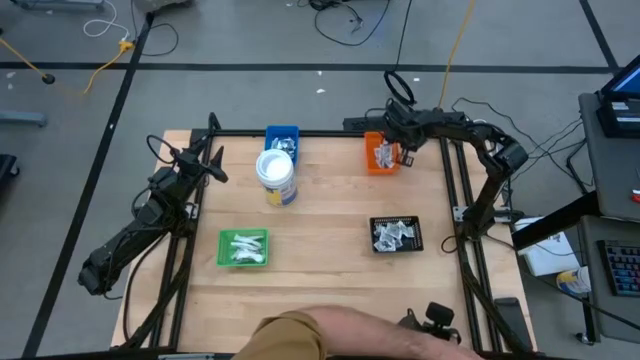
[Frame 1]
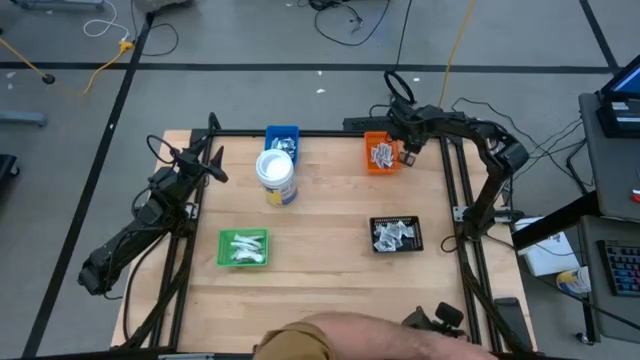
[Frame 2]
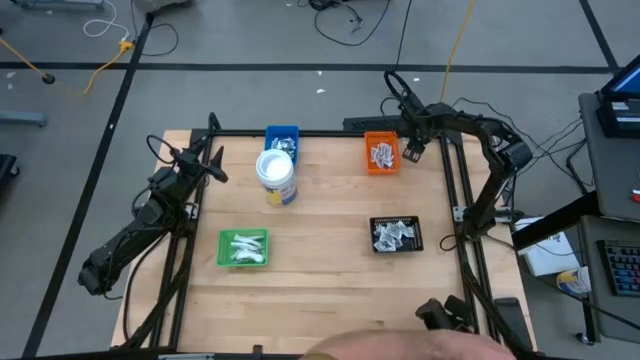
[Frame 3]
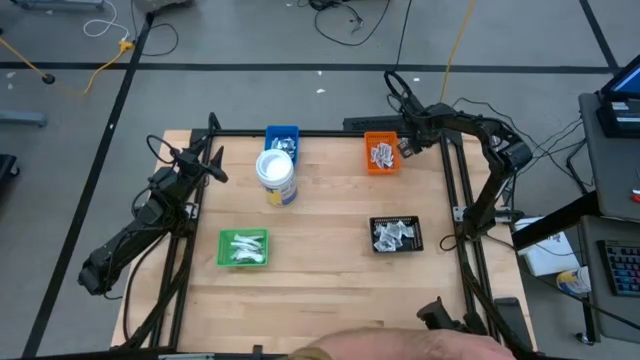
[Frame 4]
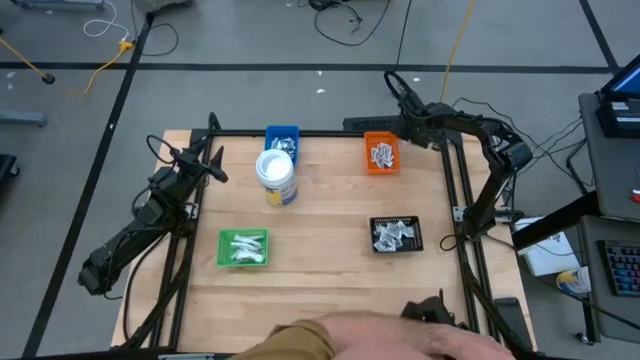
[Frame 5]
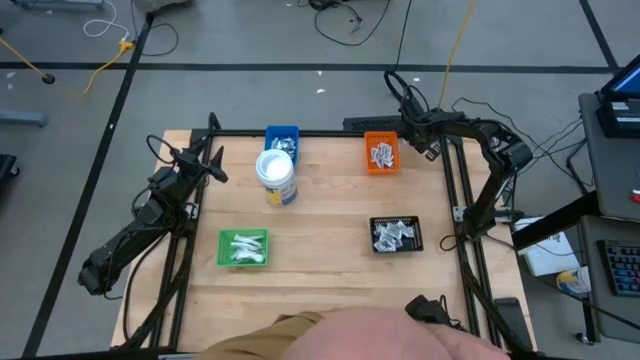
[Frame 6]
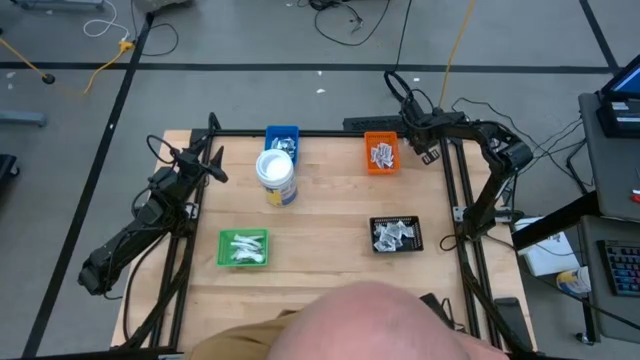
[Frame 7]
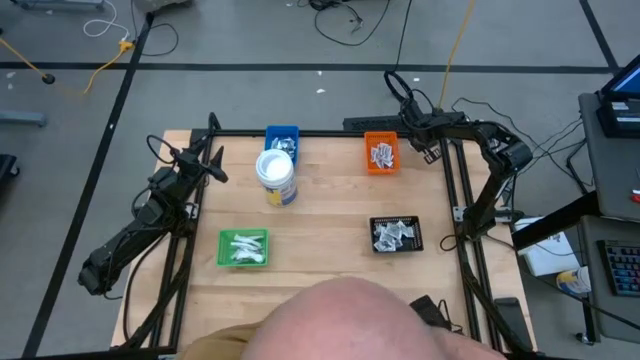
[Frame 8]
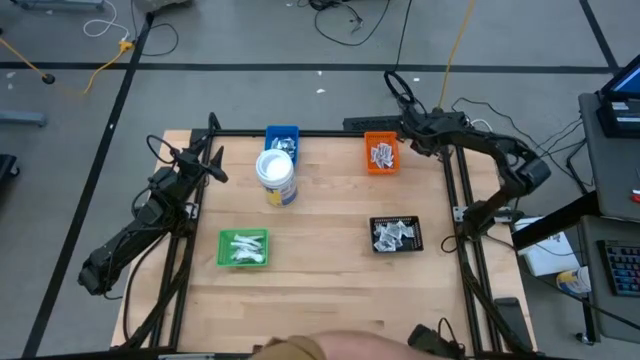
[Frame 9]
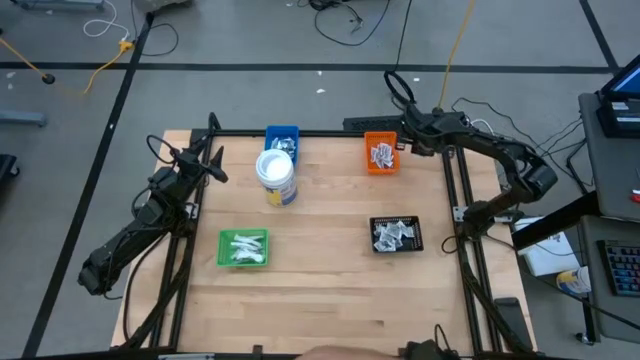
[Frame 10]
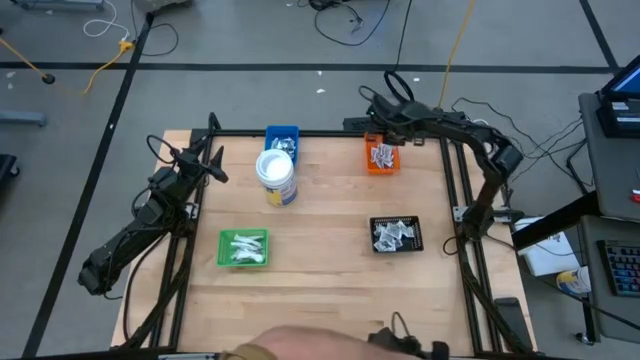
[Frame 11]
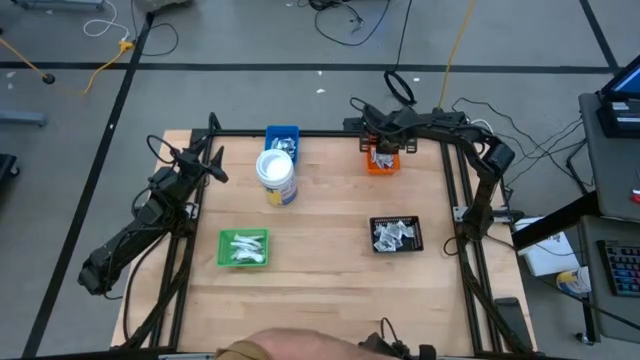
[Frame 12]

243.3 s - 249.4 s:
Task: Pick & Place First Aid Supplies
Put the orange ointment pack into the orange bin

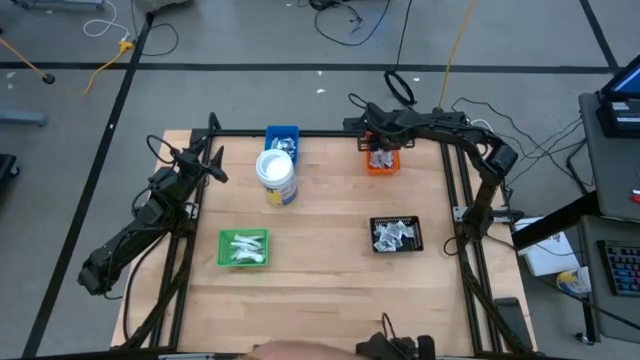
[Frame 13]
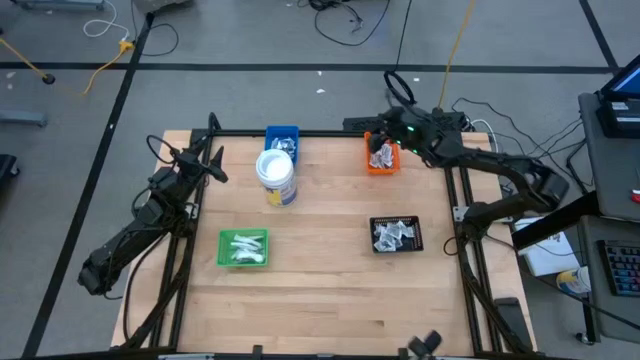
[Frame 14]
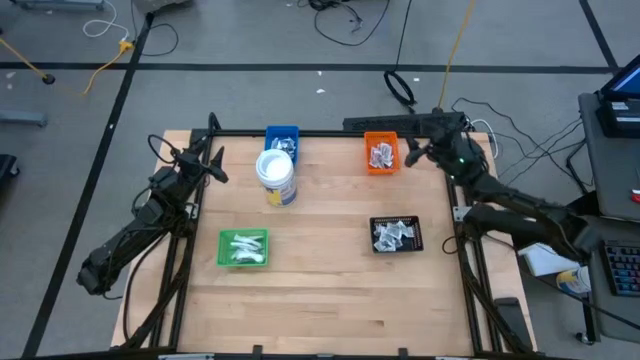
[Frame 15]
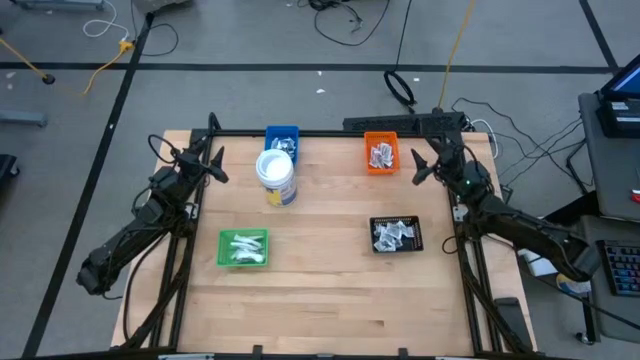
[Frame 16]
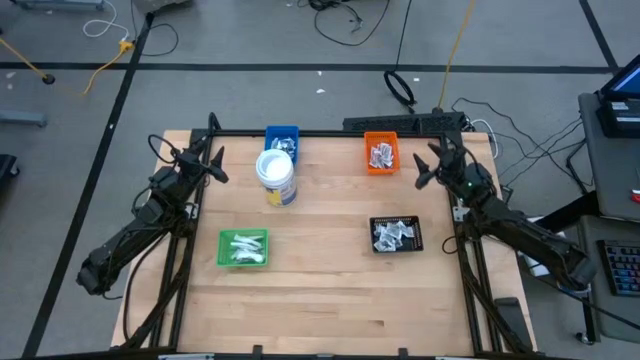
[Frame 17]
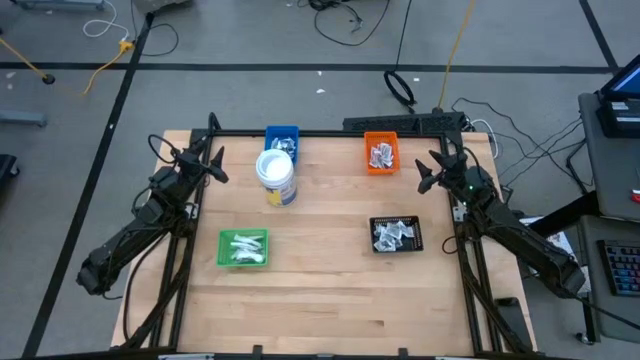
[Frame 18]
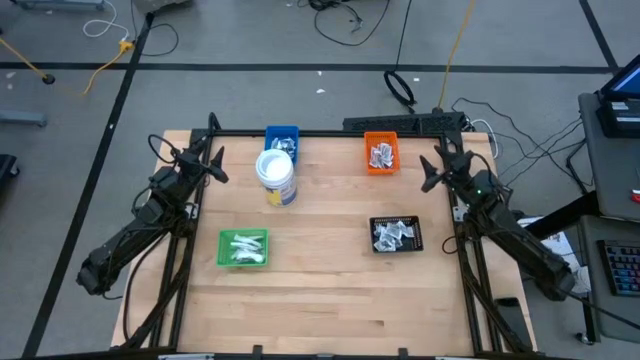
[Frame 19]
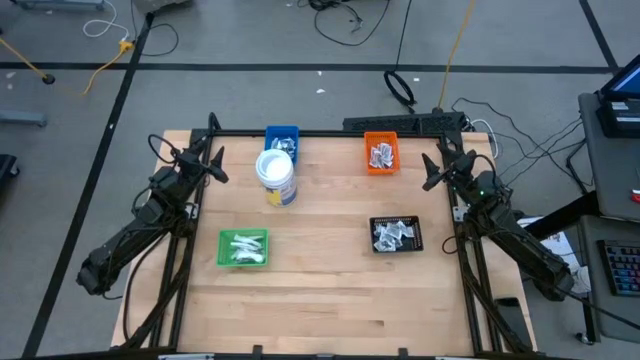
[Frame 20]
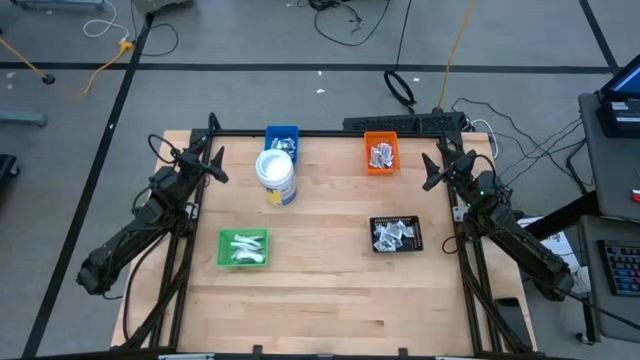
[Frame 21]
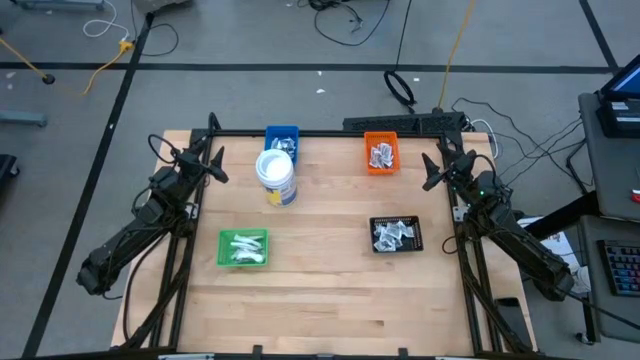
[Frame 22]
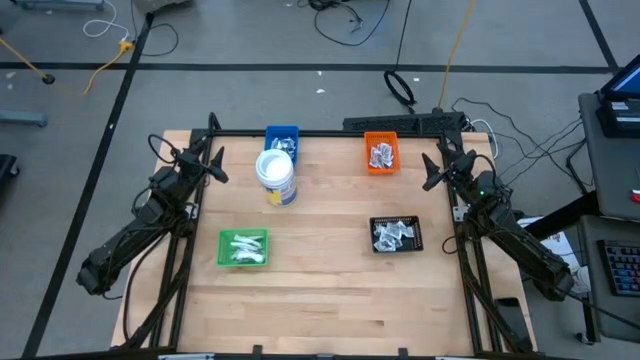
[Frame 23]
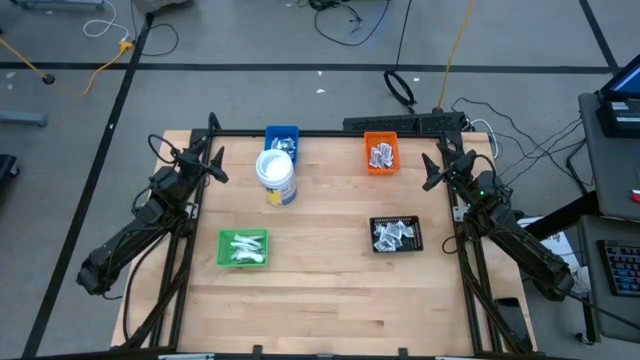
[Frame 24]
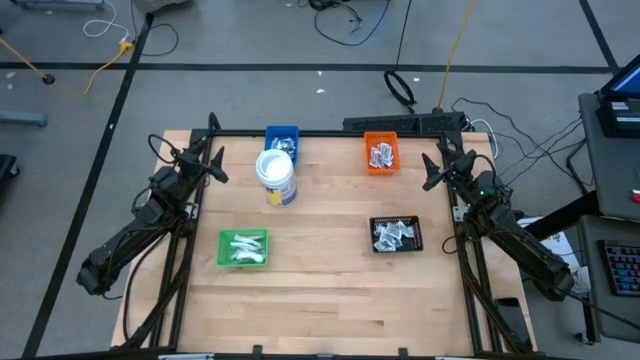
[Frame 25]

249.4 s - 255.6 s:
Return to Home Position

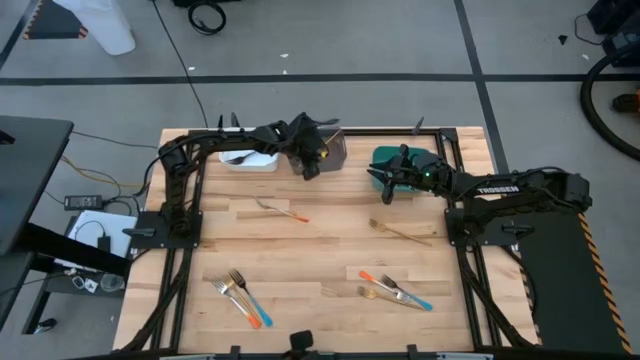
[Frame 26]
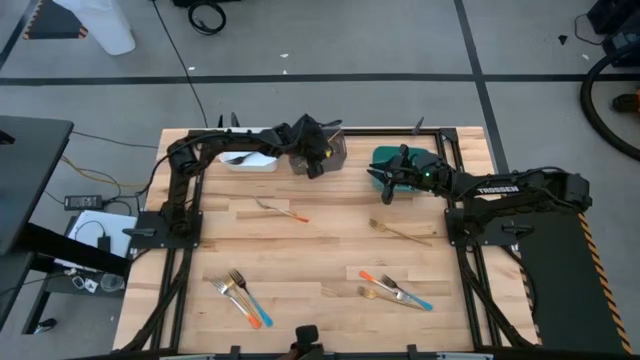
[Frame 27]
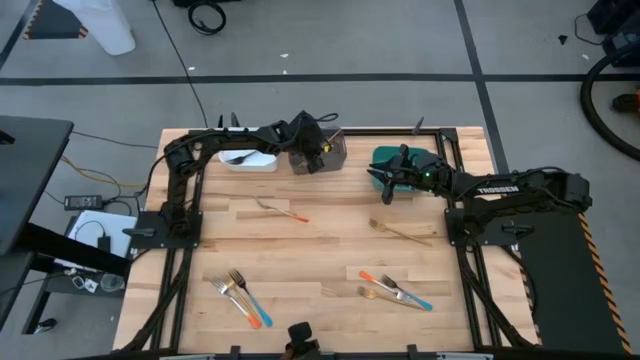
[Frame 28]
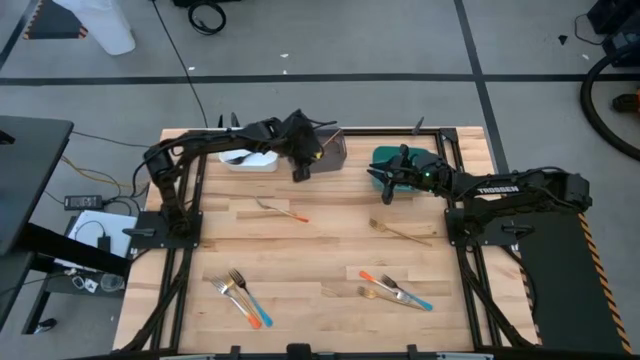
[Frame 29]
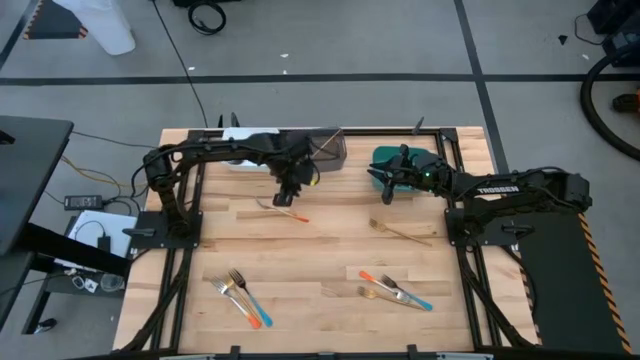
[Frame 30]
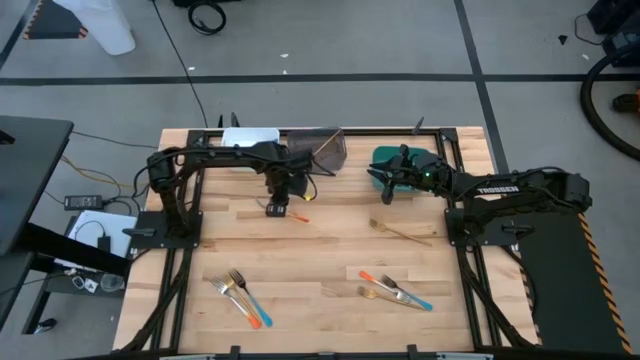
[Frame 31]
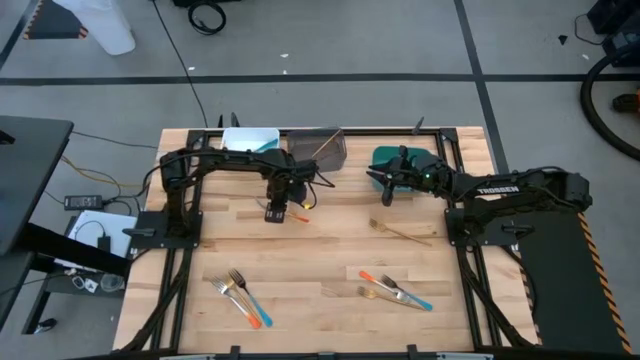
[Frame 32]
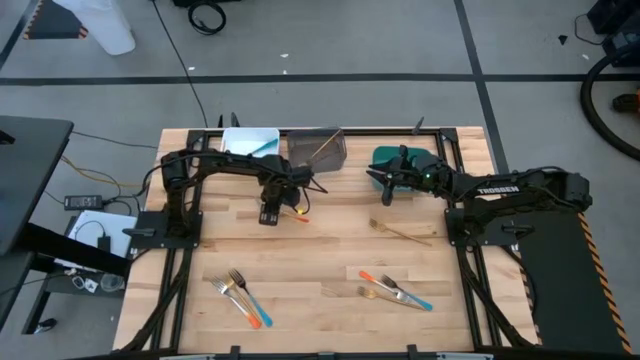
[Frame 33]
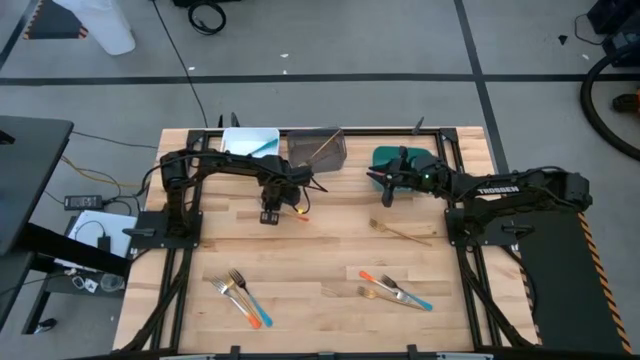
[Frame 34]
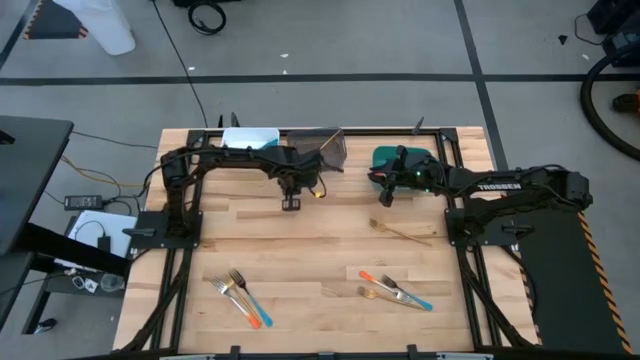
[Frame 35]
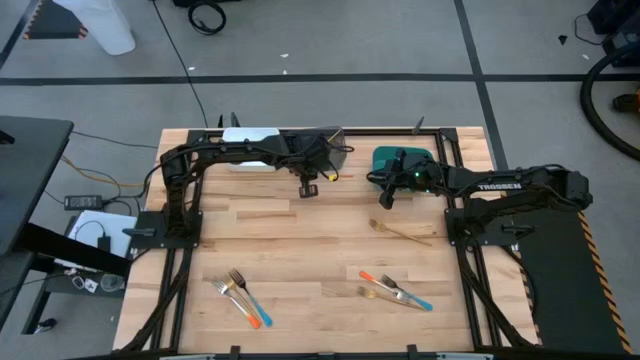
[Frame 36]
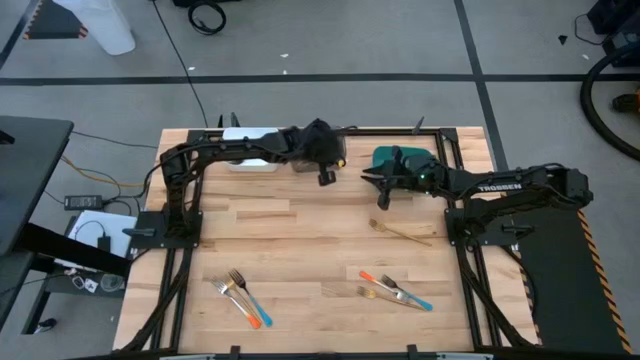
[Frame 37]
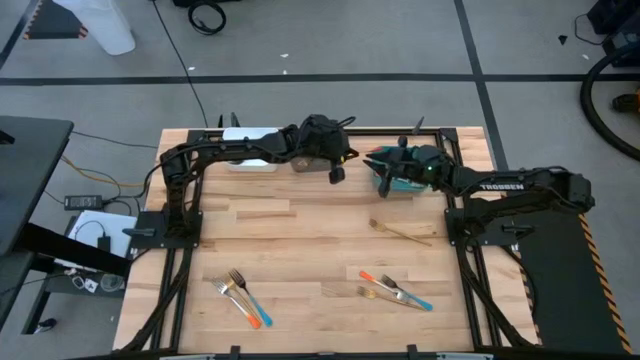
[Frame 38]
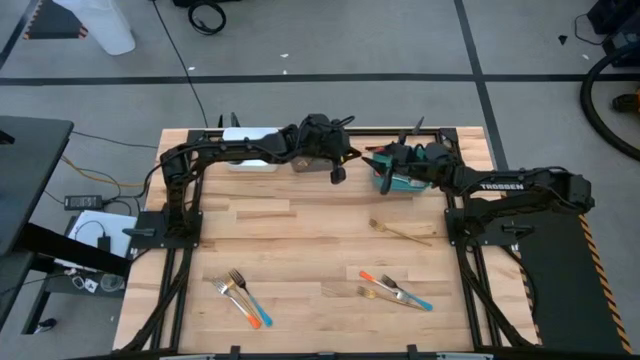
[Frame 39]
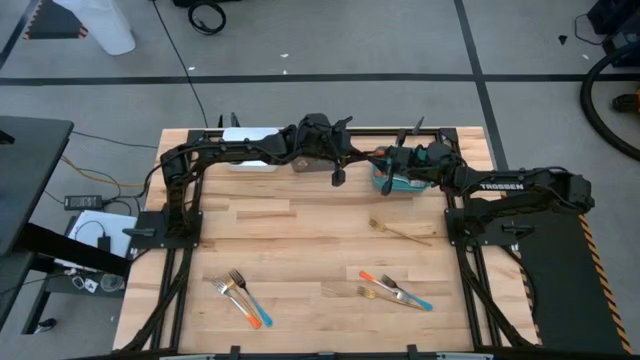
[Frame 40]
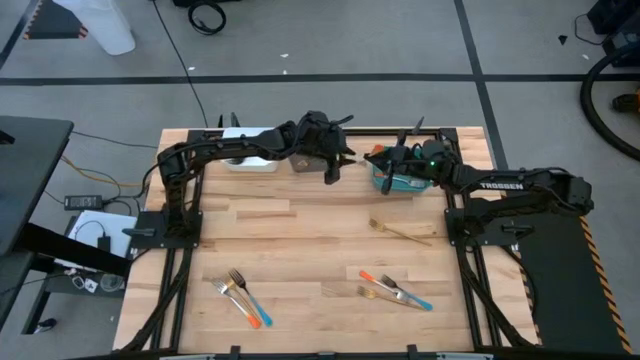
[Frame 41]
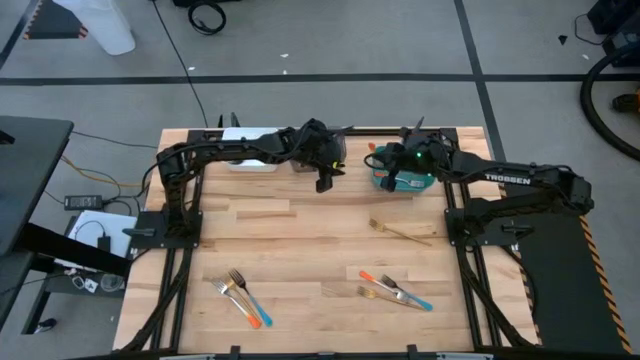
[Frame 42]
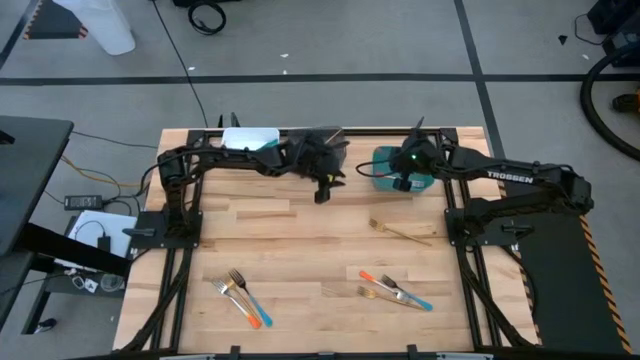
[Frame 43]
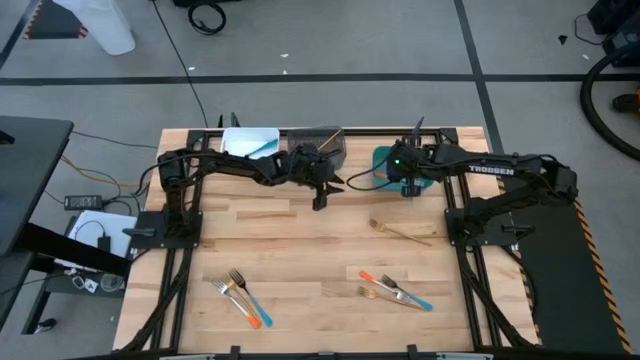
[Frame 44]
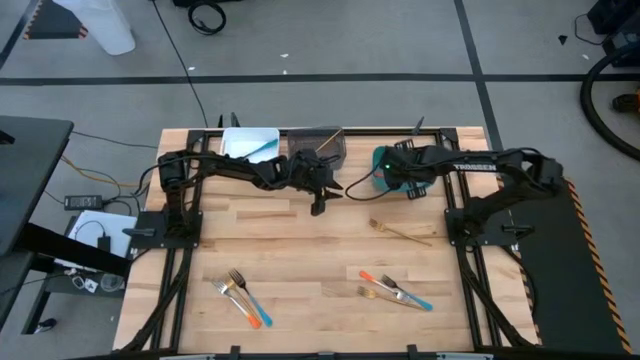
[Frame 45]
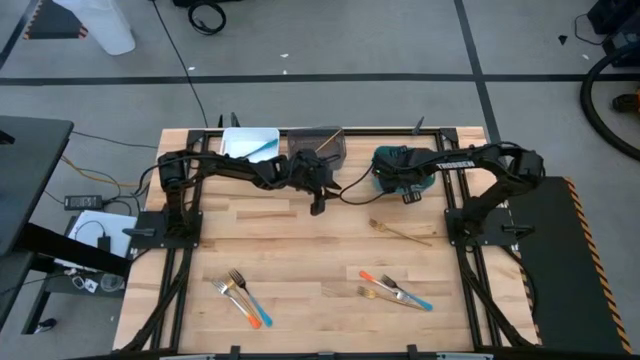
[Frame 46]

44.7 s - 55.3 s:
Task: Sort silverware by color (type)
Put the orange fork into the green bin
